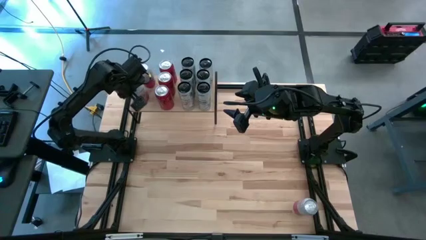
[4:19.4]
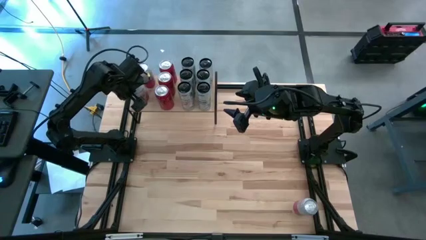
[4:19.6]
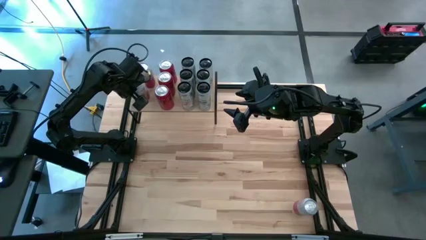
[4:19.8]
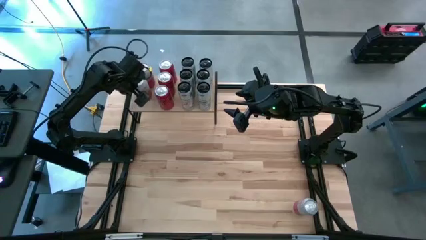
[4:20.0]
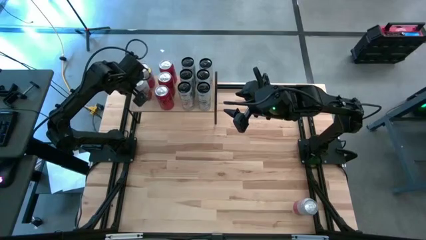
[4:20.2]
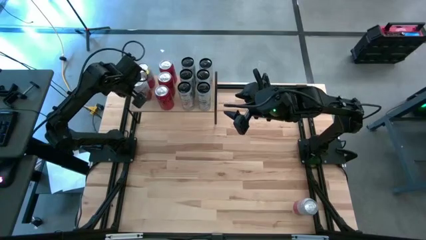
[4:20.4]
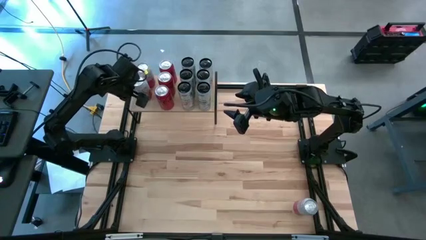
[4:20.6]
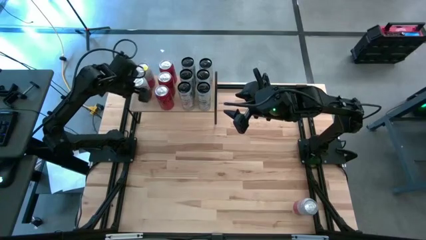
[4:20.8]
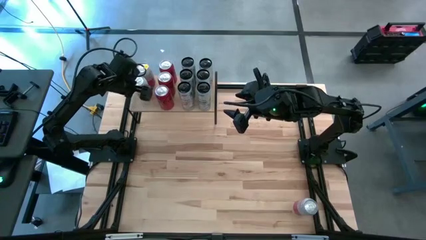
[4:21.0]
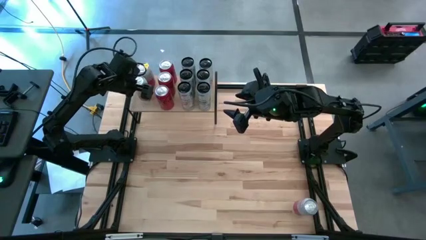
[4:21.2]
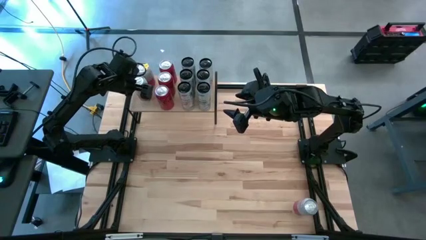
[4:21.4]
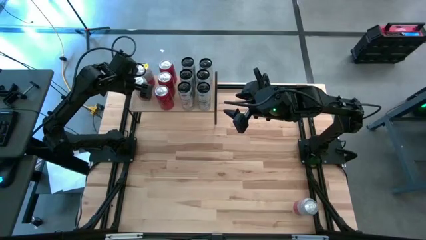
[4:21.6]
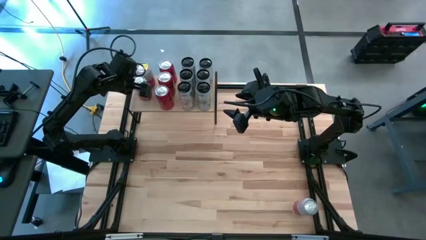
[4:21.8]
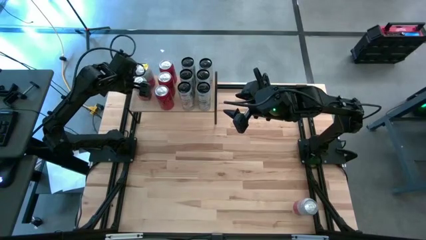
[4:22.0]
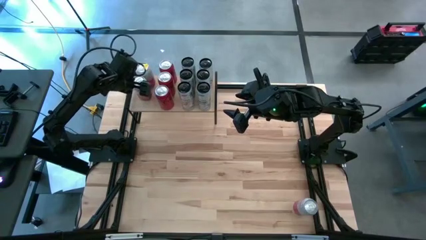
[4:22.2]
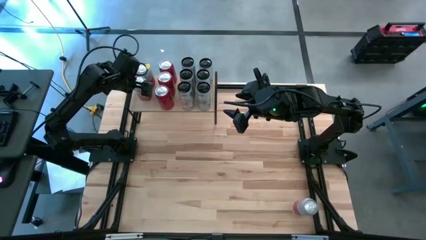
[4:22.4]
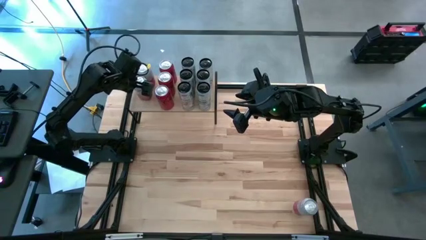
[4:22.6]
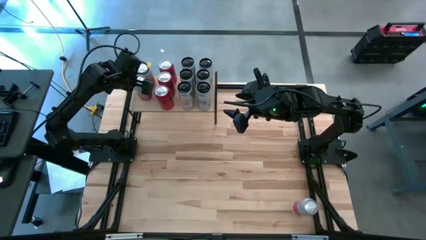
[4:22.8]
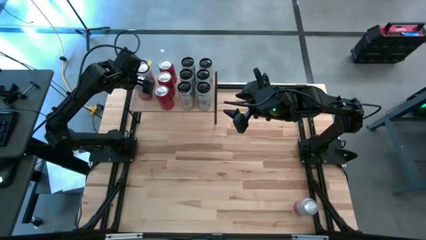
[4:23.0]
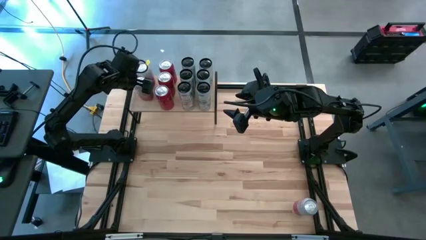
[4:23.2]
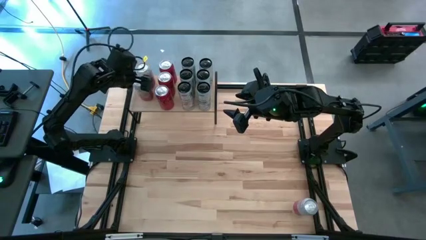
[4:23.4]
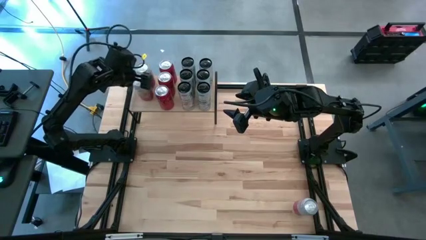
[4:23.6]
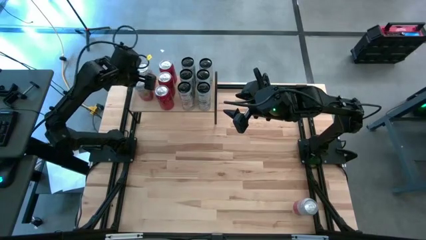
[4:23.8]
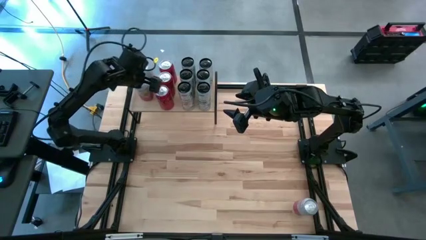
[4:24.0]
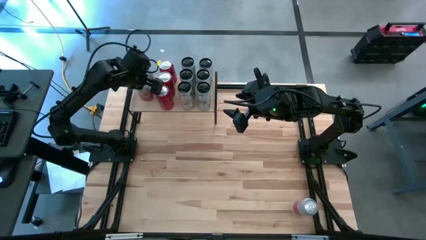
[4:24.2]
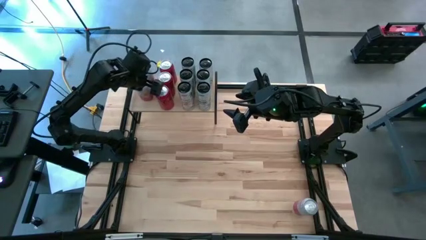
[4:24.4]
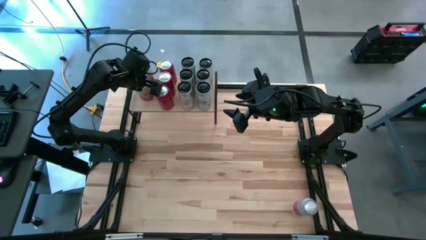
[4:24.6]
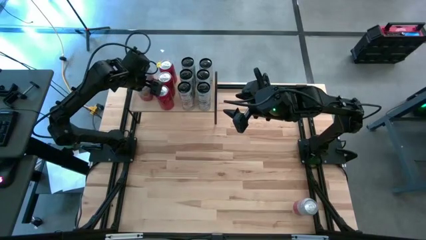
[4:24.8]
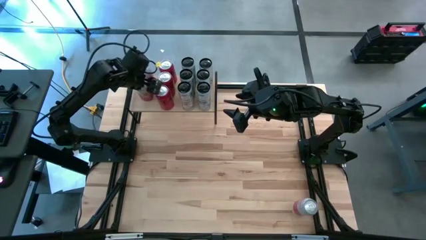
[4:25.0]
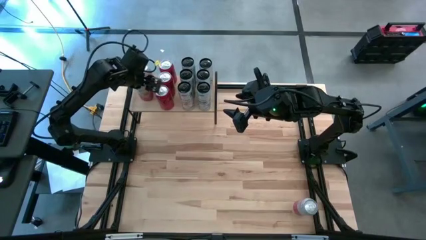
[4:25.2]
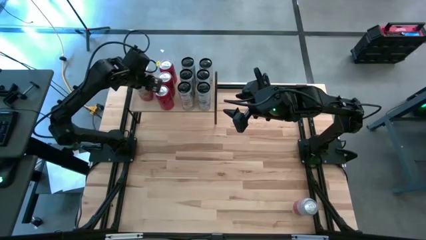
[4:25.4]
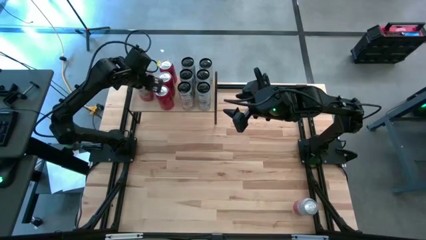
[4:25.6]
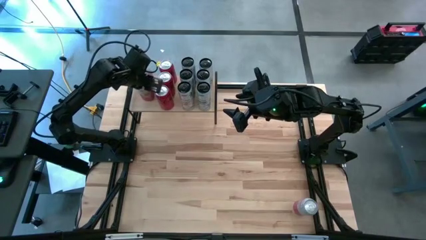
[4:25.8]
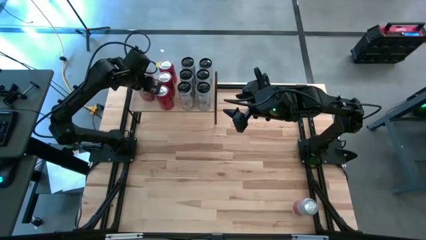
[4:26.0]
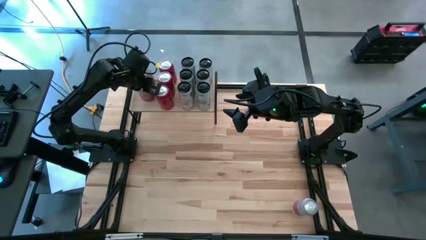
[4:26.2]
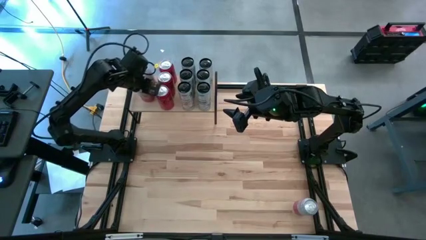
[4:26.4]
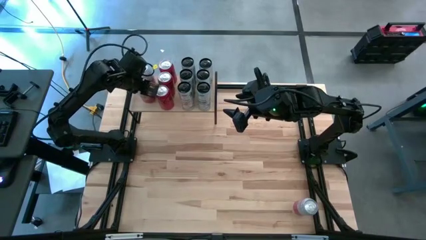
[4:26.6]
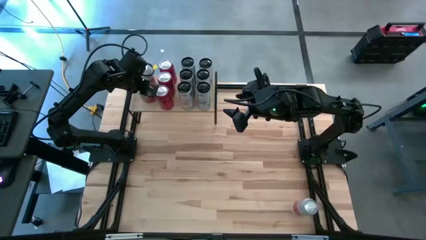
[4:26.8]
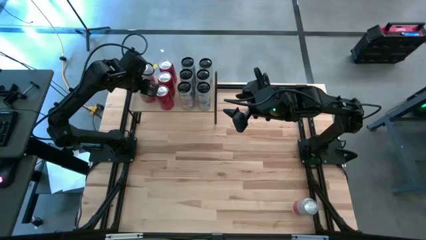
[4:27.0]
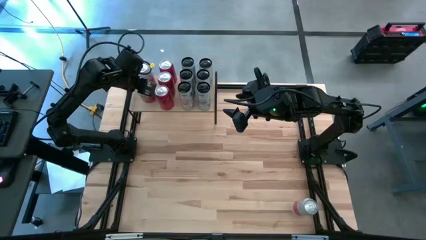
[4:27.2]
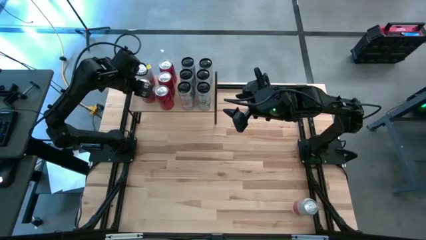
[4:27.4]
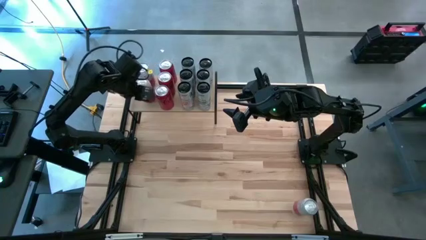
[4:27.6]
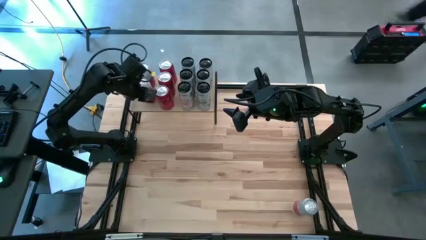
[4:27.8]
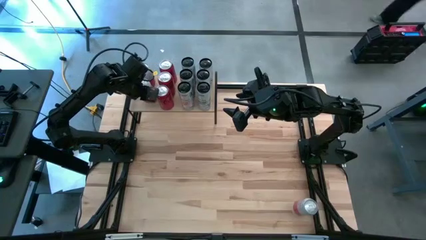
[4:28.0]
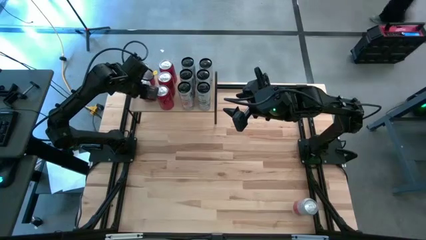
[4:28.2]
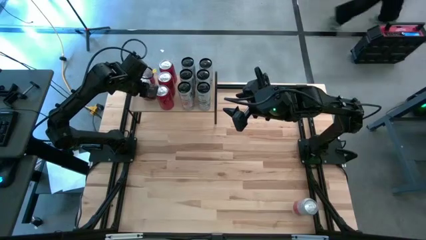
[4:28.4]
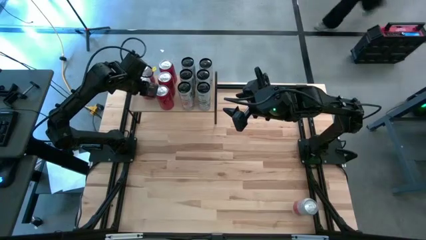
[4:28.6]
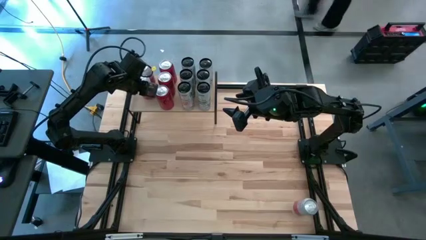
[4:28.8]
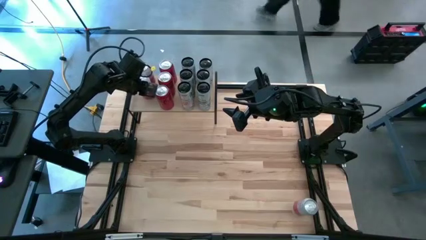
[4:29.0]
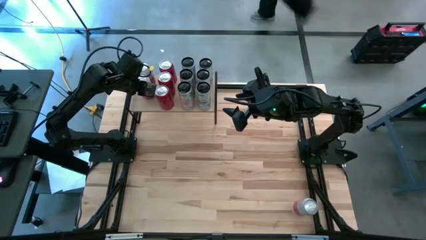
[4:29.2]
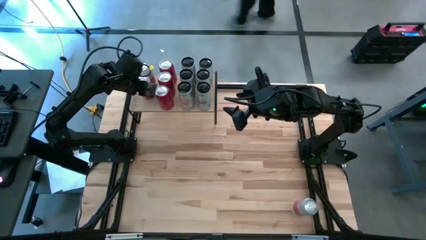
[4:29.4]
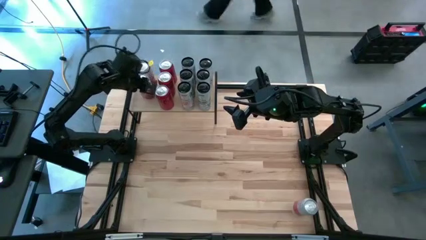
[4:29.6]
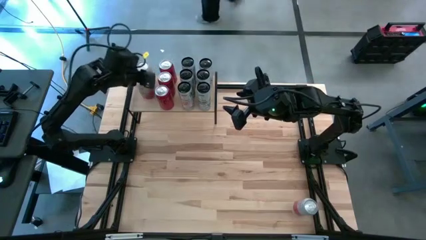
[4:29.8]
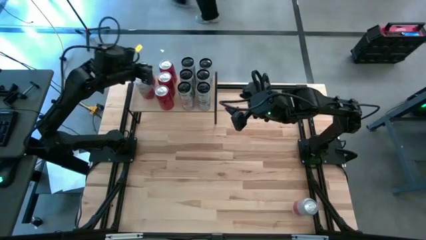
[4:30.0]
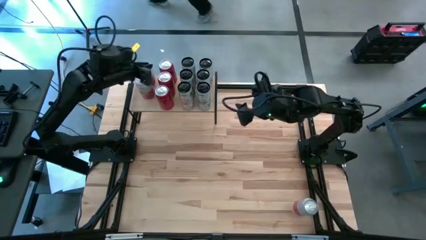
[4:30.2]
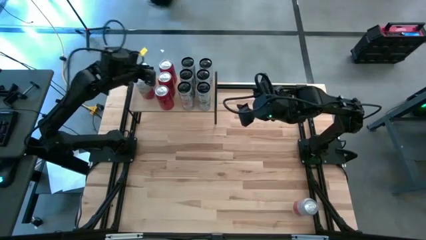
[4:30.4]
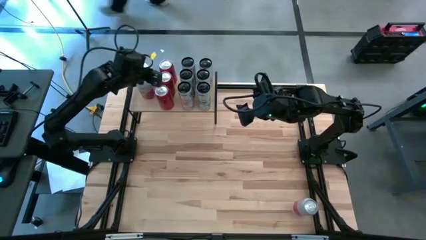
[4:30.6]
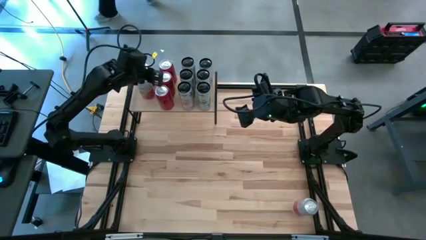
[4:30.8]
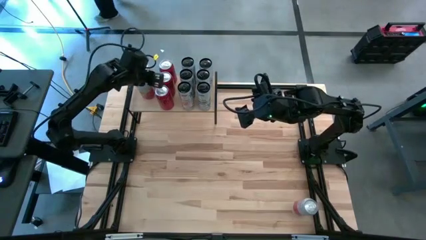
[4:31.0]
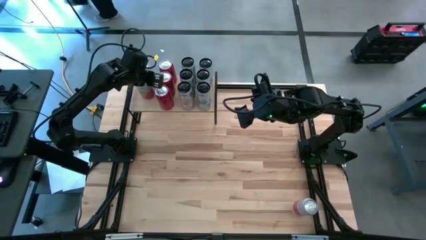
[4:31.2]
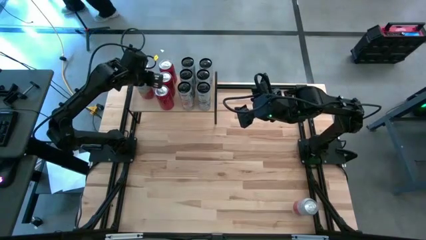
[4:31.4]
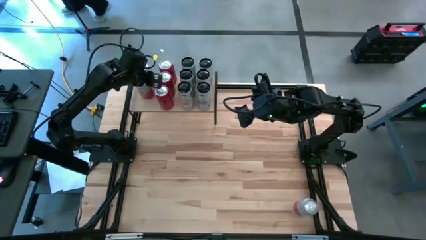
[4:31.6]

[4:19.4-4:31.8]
Task: Place canned beverage on shelf
Put the left pink soda can on the shelf aligned with the other pink soda can
